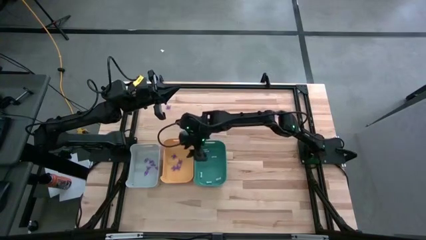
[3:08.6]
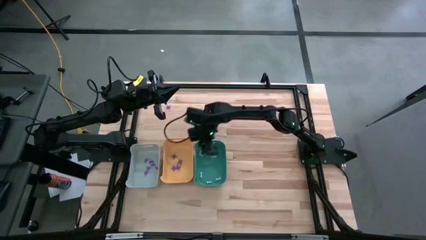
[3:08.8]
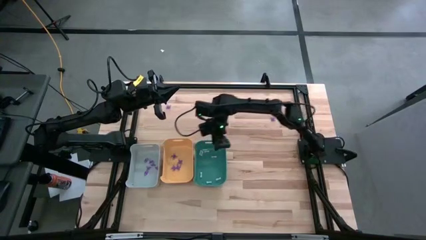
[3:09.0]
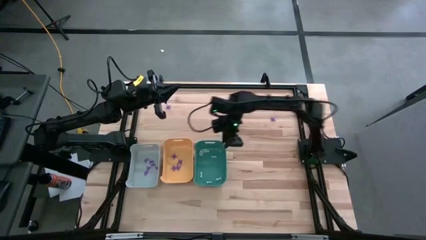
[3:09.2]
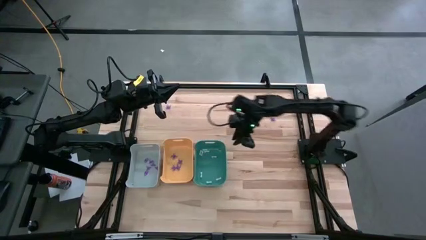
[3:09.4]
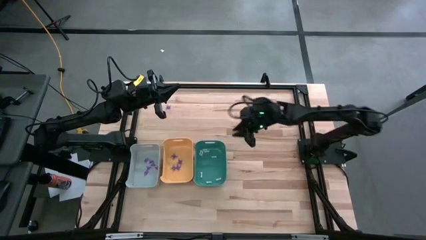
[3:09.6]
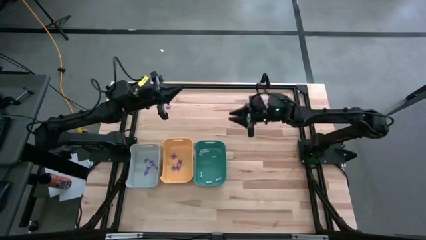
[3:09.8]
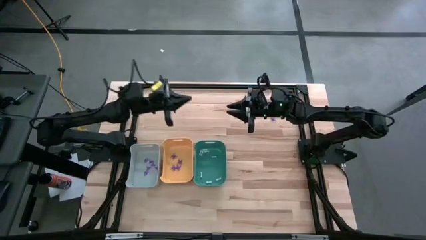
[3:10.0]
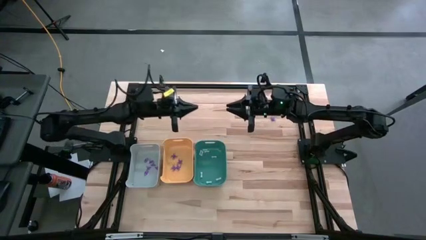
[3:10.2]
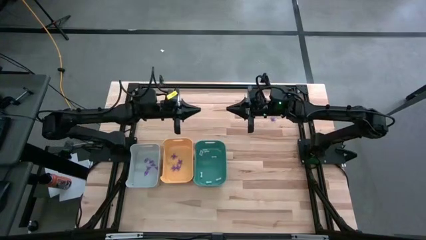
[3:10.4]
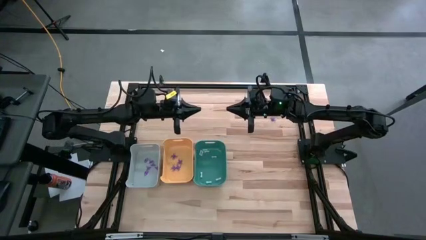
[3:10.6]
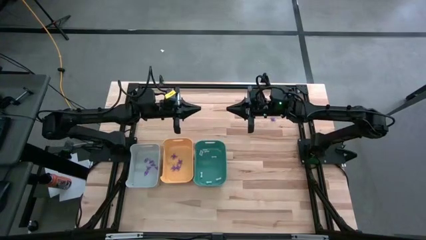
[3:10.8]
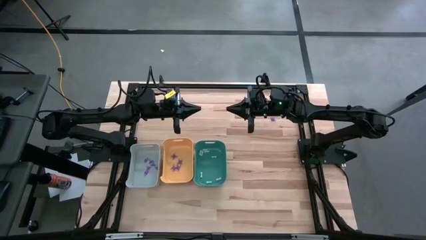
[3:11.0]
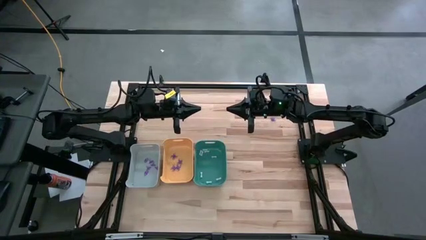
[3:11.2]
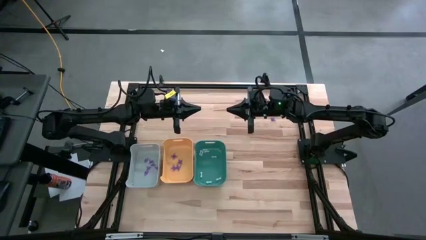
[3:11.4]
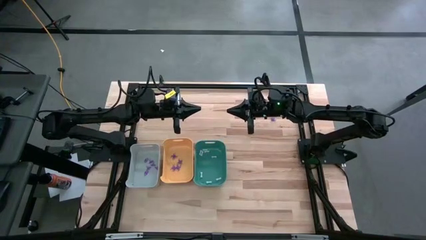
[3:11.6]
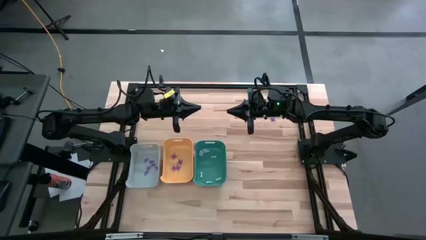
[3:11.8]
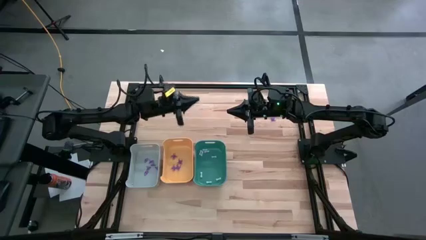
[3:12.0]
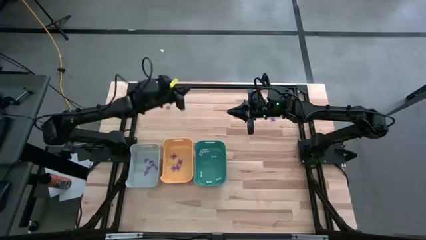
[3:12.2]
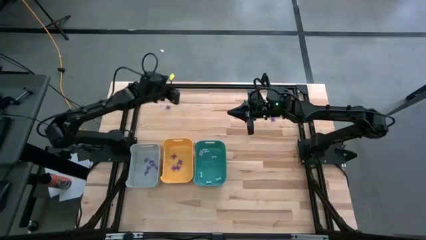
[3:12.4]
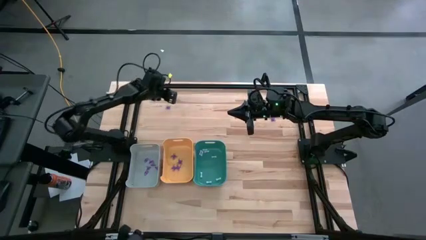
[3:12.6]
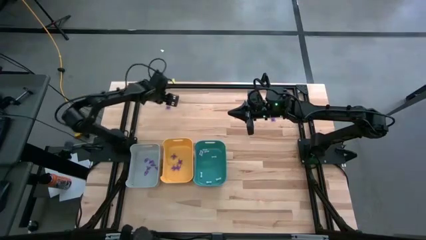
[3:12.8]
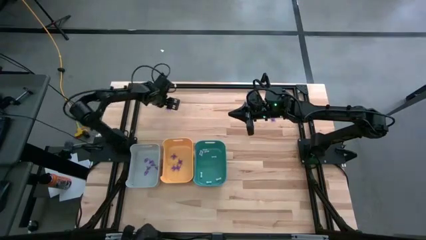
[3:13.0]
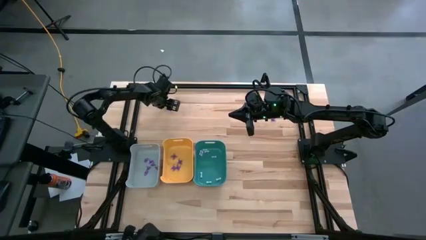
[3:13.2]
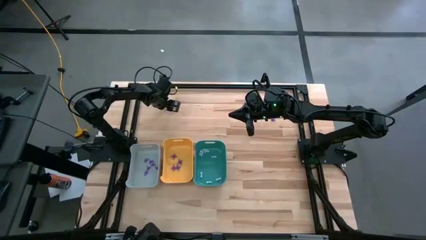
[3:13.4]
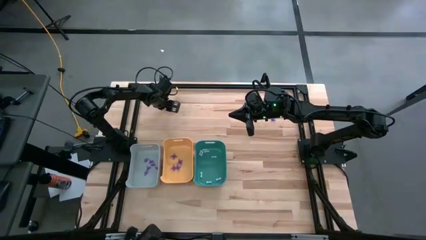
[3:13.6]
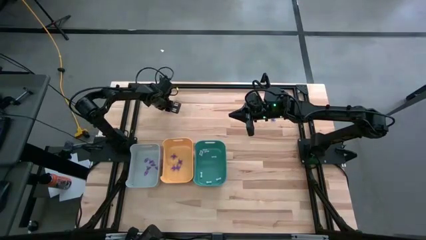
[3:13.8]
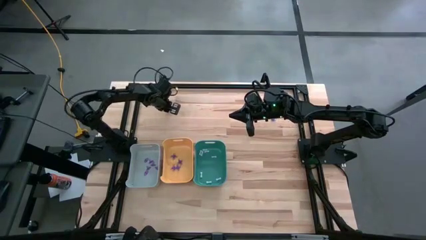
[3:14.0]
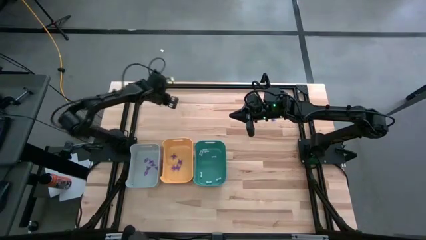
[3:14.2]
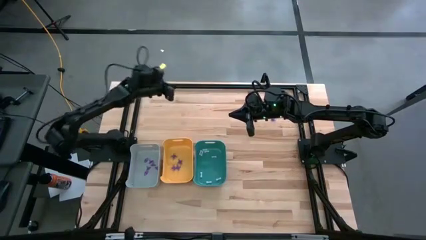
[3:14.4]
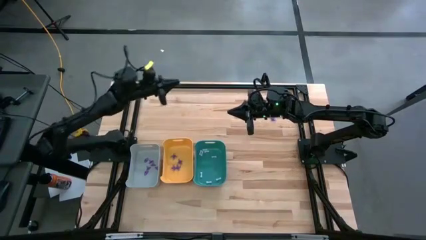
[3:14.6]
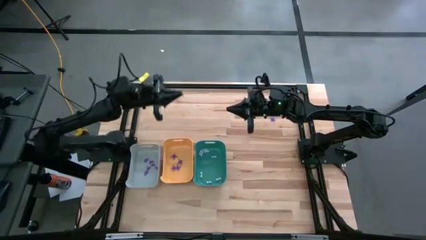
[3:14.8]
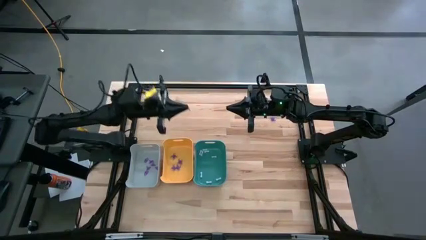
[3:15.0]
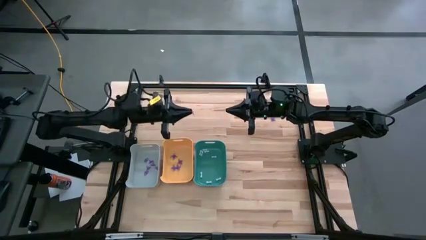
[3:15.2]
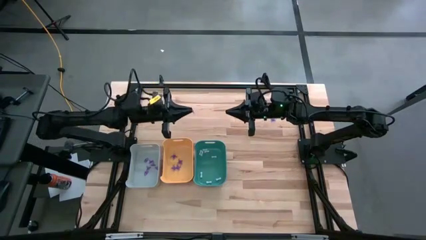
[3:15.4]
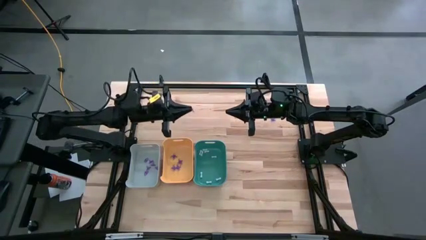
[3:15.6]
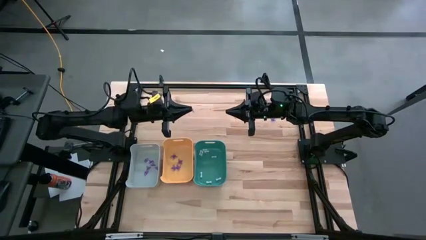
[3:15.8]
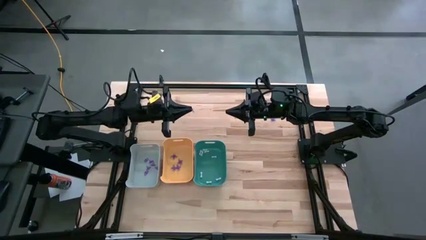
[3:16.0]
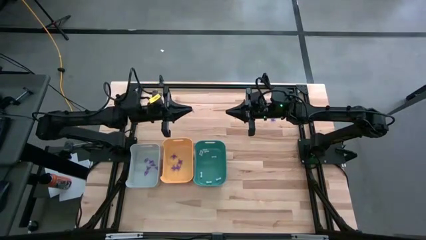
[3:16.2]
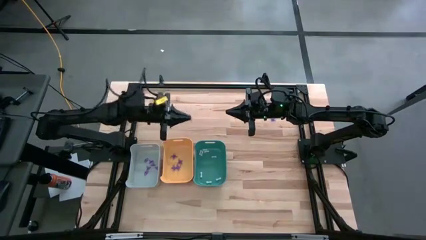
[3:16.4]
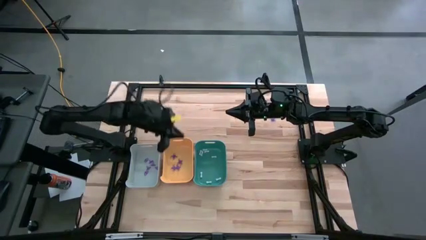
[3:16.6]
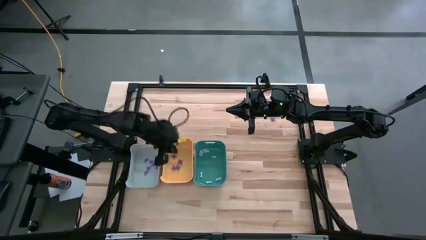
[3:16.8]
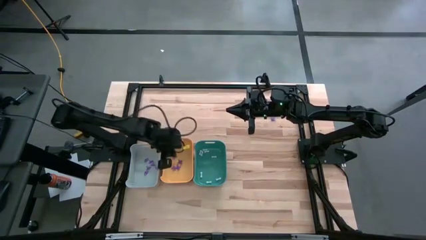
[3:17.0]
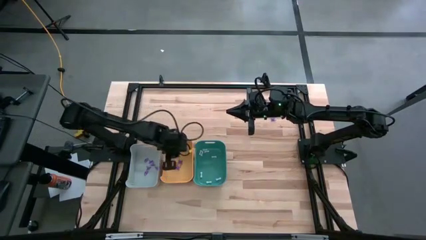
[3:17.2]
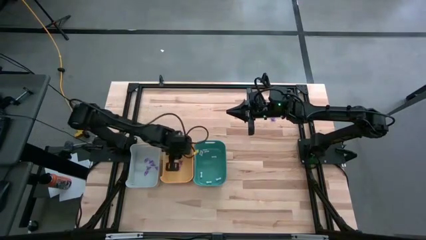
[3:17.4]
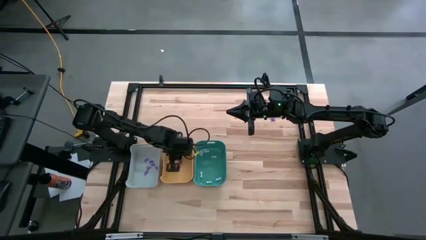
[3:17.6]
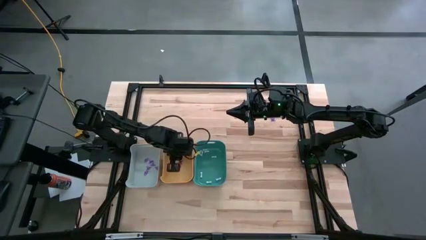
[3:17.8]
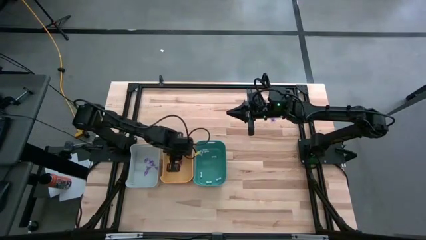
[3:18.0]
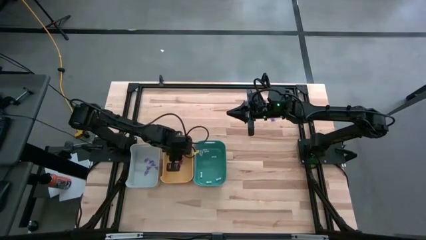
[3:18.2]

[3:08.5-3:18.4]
Task: Sort Halloween decoration
Put the purple spider toy into the yellow bin

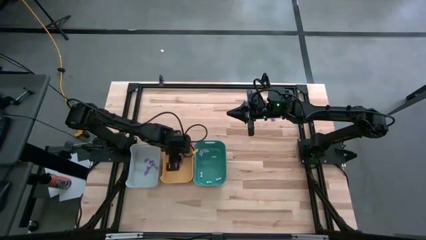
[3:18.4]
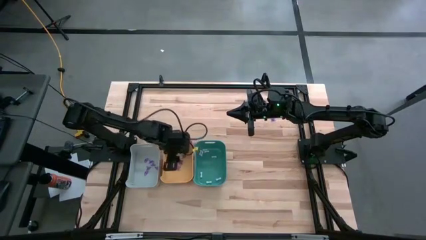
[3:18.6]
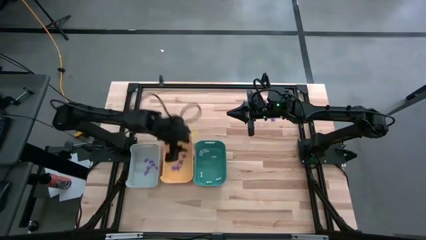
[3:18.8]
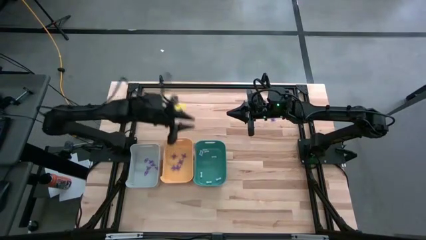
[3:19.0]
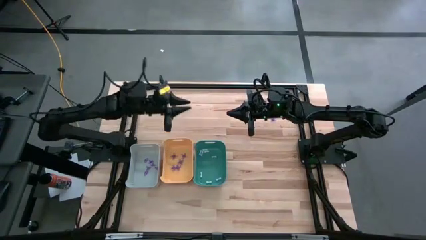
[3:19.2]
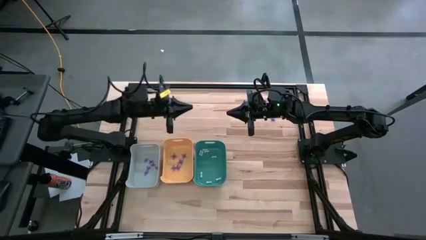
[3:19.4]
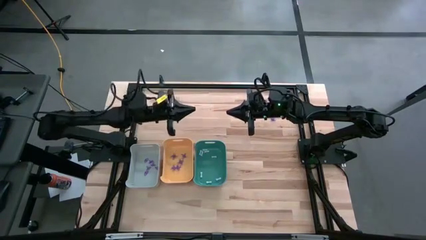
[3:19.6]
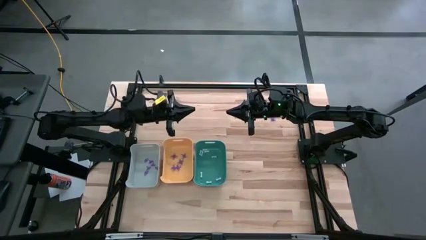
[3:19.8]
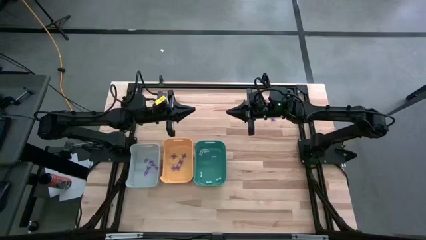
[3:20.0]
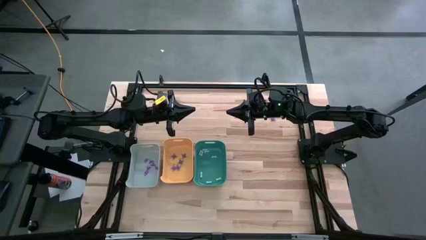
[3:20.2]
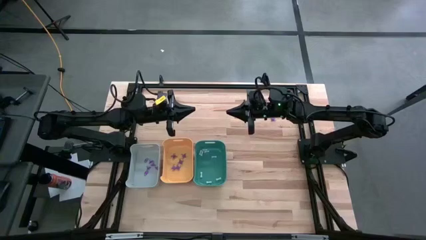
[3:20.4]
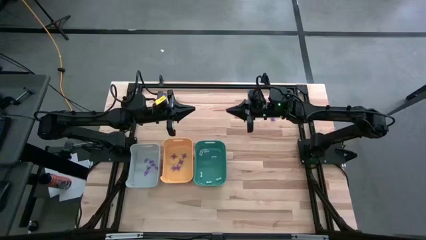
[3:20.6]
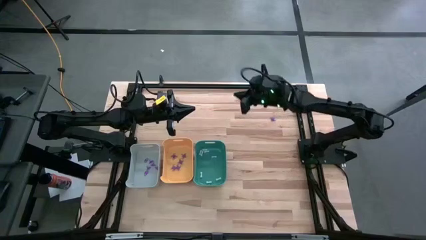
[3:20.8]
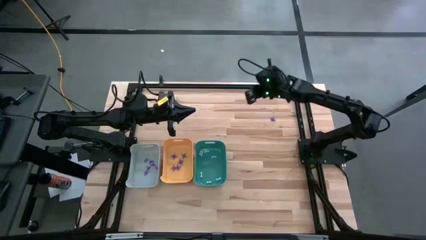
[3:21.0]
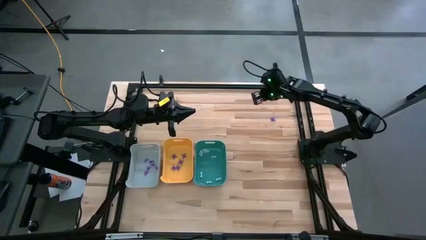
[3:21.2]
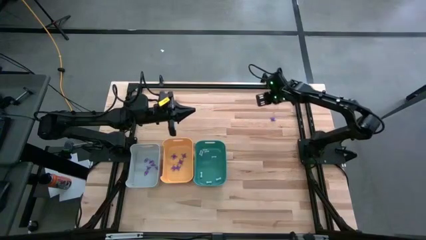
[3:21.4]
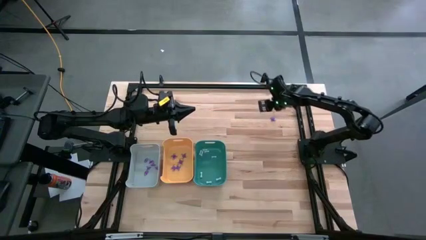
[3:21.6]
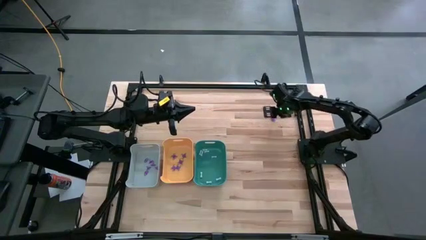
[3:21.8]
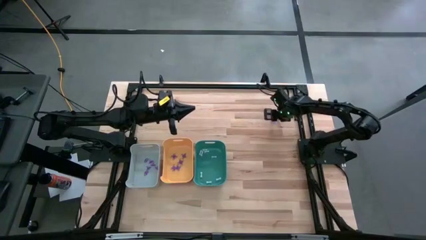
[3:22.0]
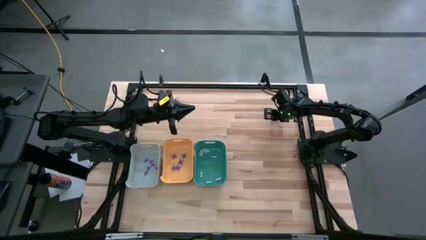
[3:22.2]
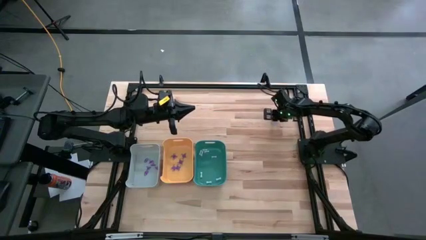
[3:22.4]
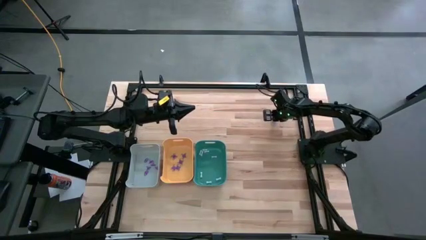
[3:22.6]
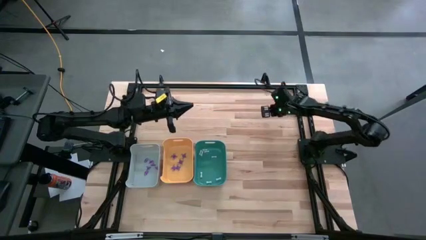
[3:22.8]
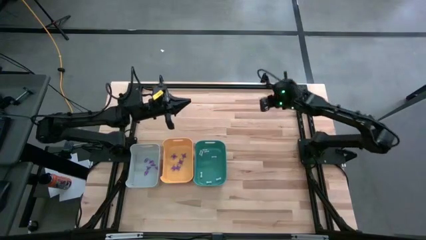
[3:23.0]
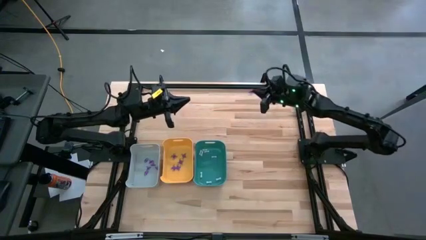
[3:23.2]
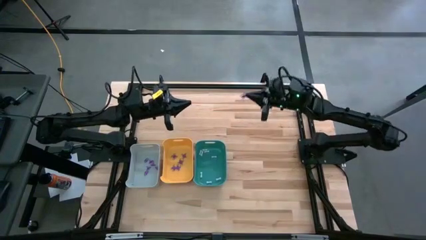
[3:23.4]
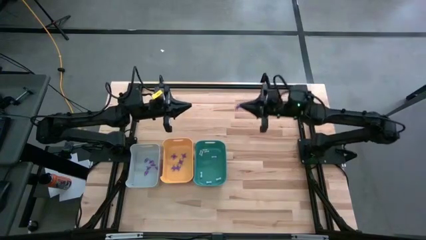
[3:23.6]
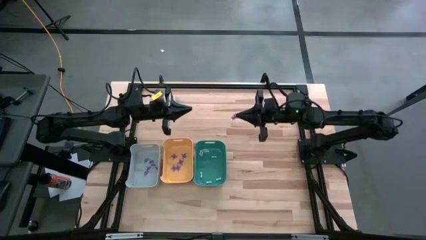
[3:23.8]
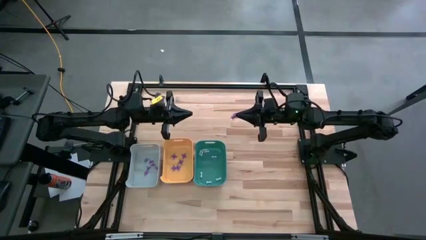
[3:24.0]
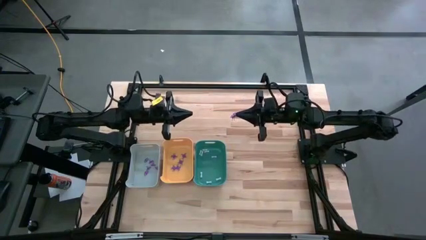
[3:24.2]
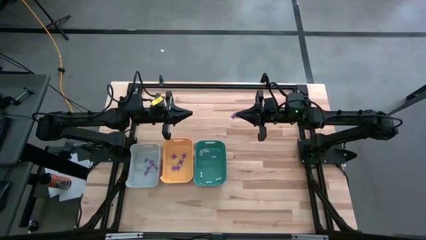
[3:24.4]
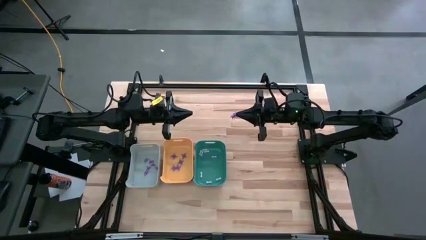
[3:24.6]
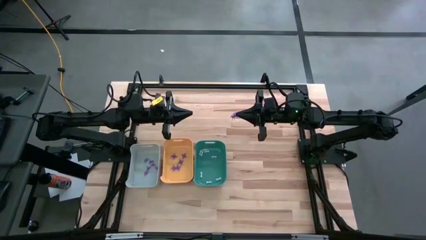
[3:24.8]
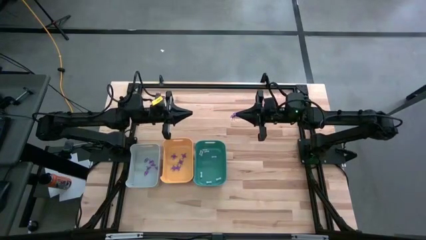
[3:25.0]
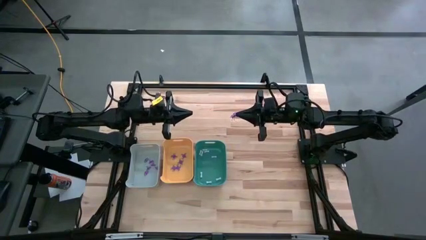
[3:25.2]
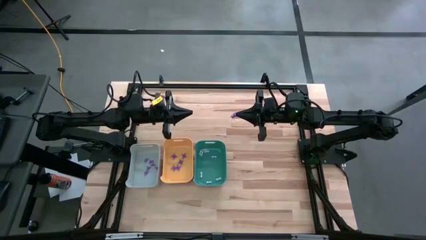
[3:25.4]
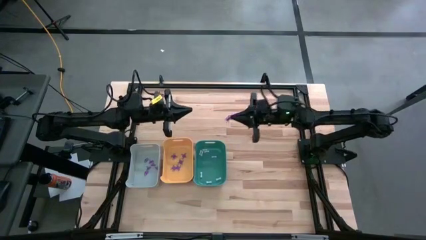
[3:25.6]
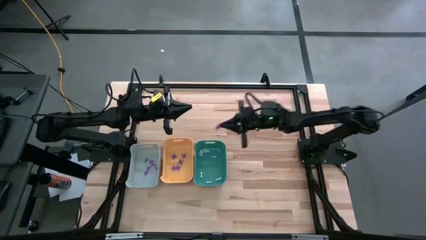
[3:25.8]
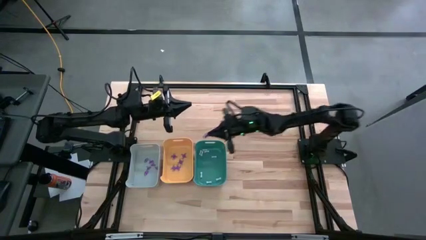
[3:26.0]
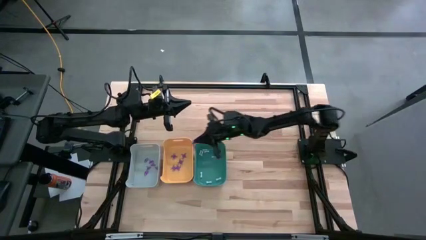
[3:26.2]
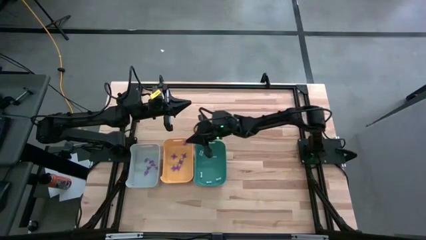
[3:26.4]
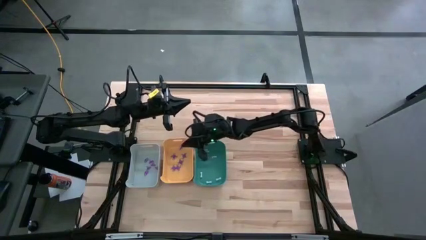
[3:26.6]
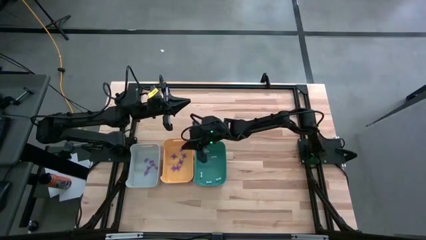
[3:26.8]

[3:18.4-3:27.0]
Put the purple spider toy into the yellow bin
